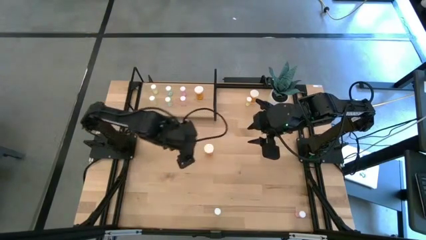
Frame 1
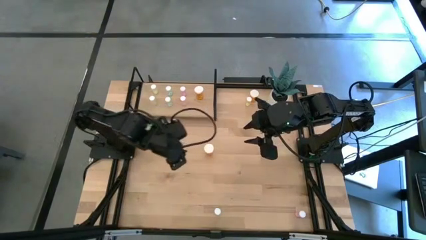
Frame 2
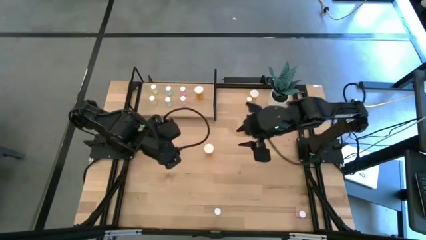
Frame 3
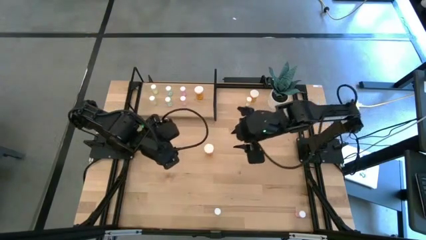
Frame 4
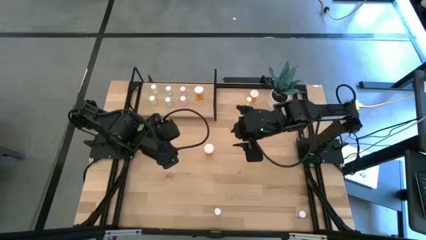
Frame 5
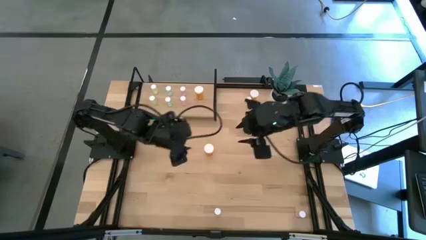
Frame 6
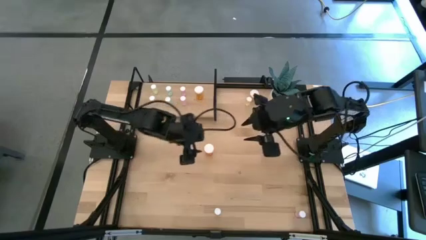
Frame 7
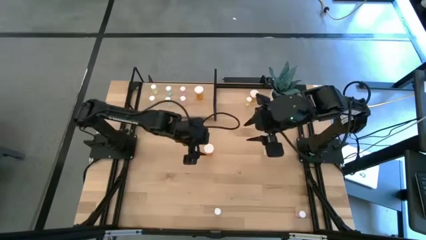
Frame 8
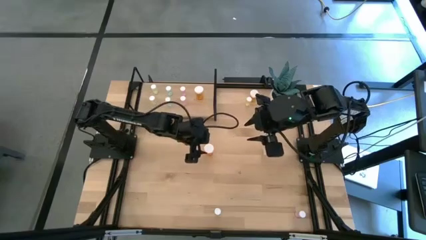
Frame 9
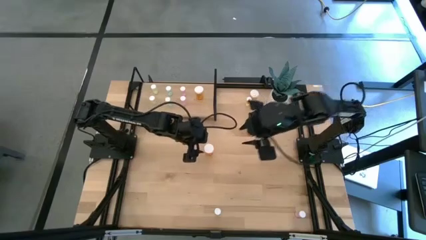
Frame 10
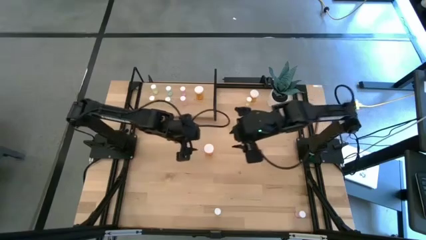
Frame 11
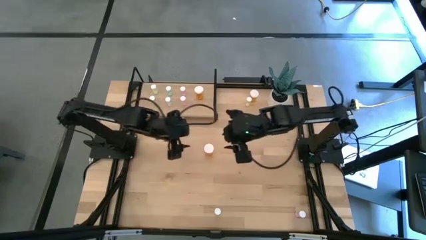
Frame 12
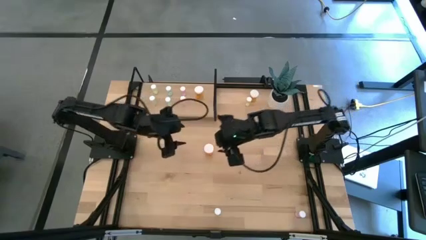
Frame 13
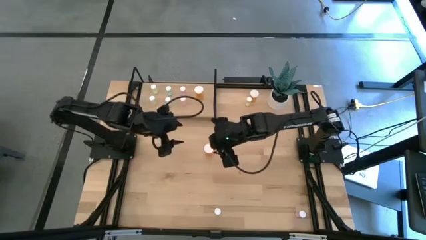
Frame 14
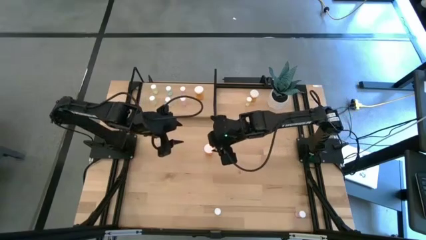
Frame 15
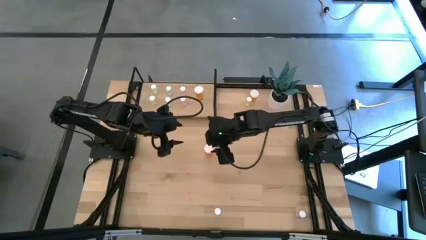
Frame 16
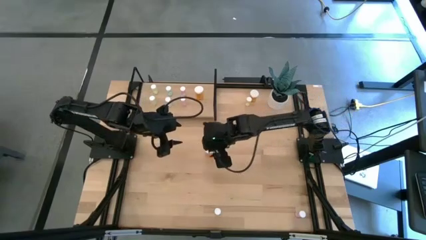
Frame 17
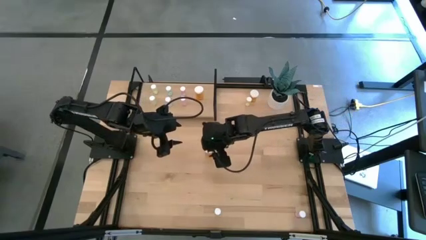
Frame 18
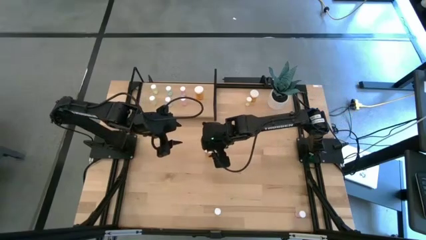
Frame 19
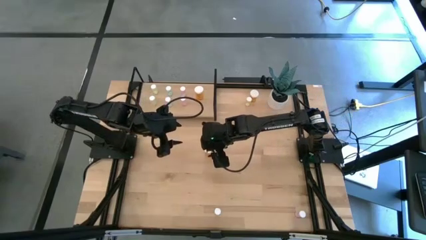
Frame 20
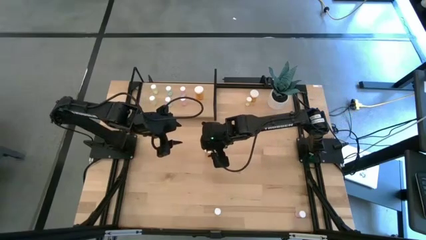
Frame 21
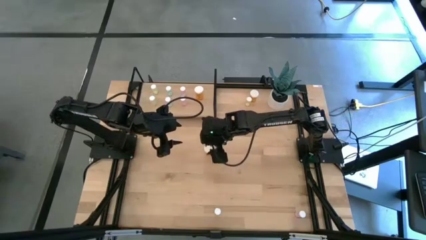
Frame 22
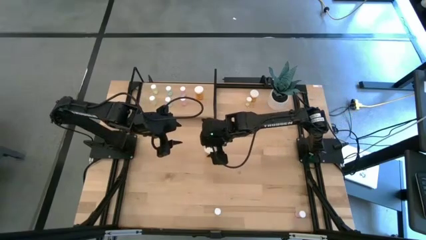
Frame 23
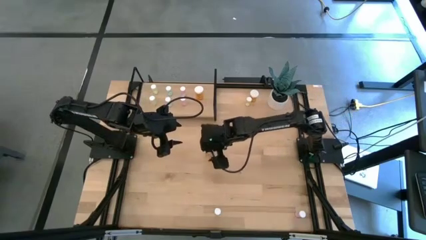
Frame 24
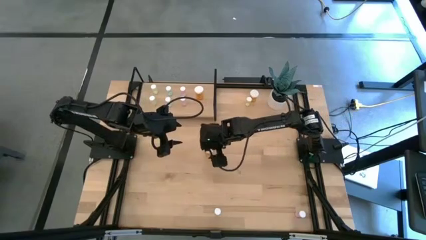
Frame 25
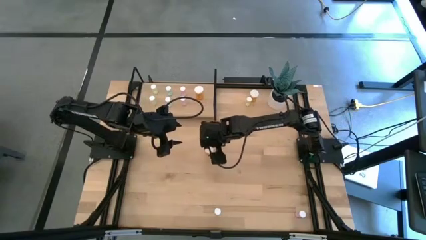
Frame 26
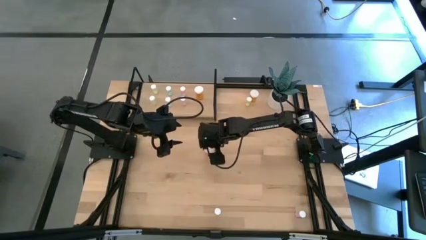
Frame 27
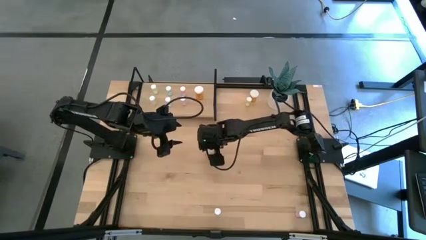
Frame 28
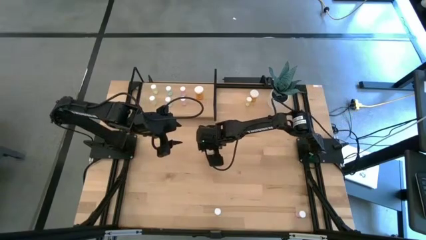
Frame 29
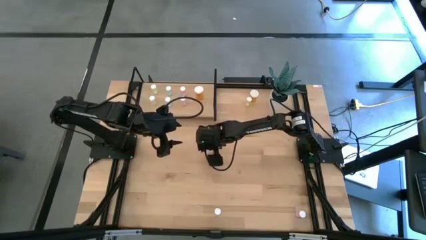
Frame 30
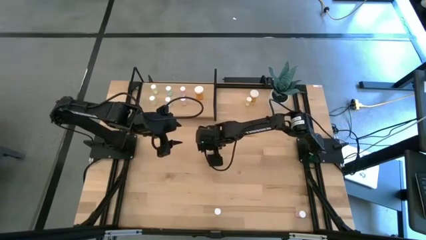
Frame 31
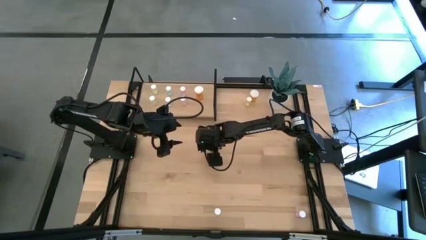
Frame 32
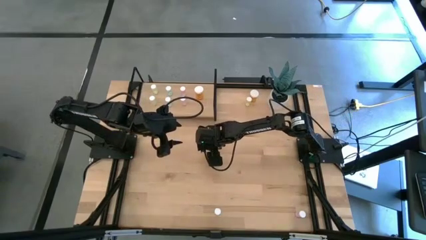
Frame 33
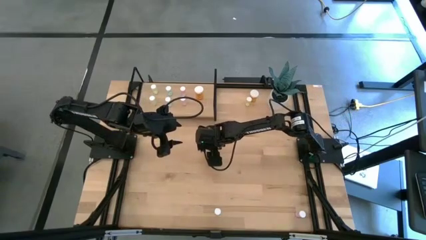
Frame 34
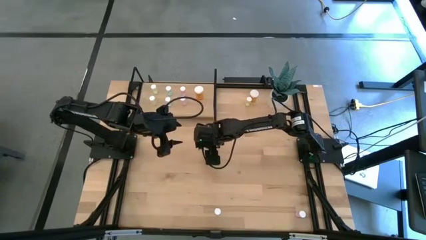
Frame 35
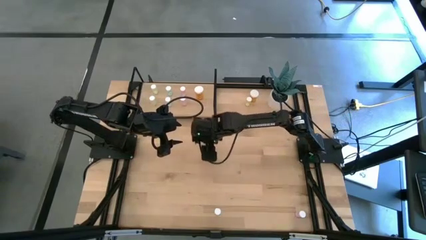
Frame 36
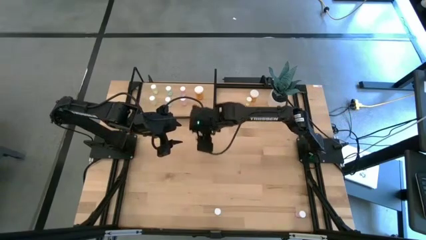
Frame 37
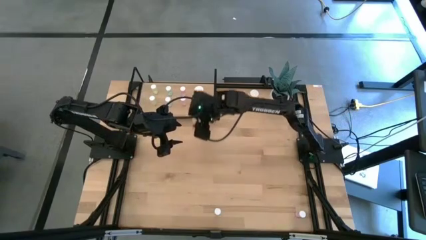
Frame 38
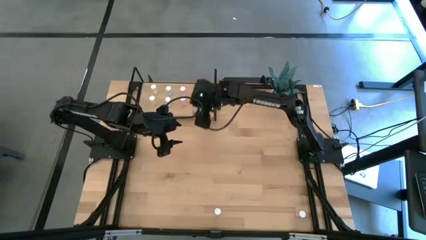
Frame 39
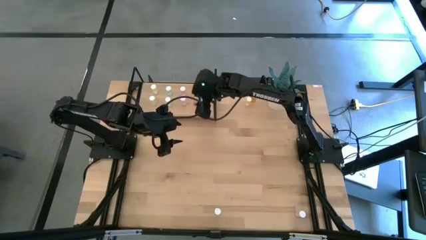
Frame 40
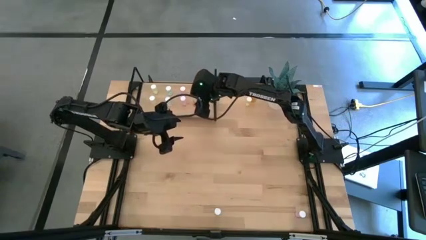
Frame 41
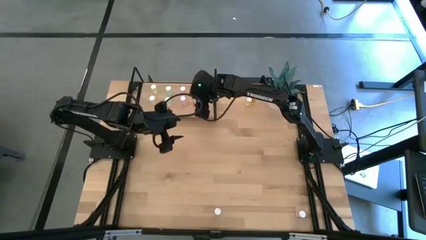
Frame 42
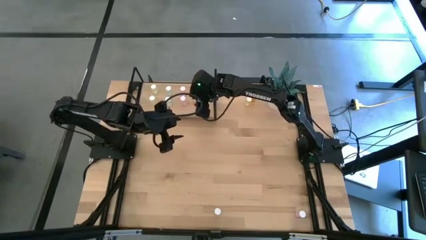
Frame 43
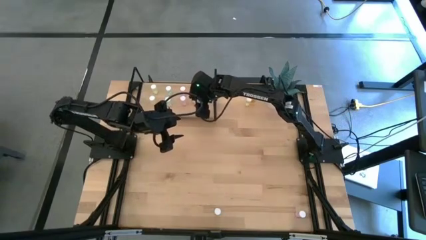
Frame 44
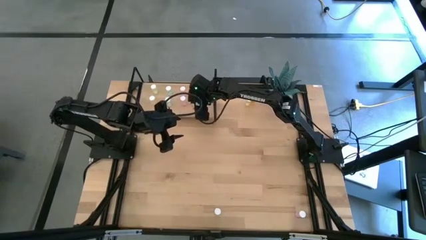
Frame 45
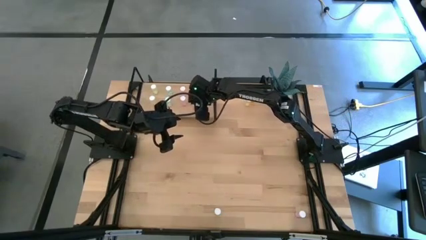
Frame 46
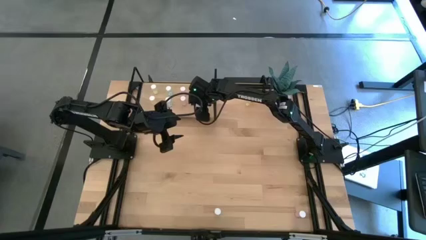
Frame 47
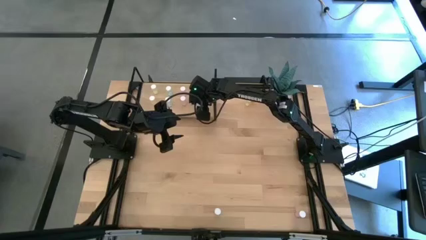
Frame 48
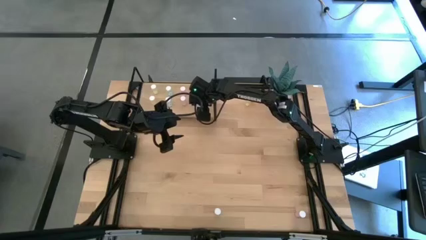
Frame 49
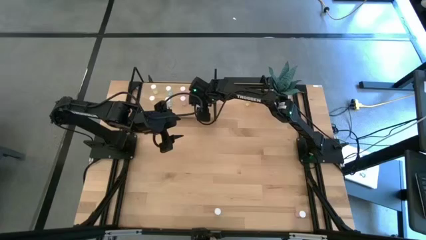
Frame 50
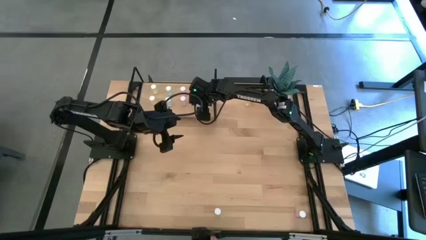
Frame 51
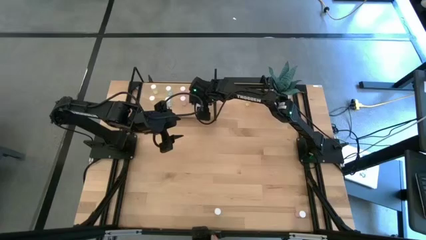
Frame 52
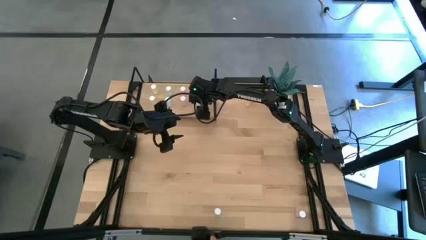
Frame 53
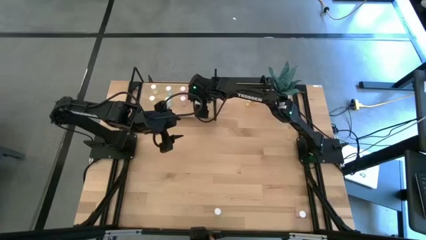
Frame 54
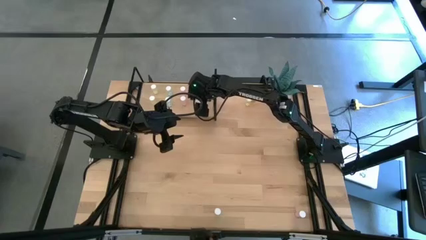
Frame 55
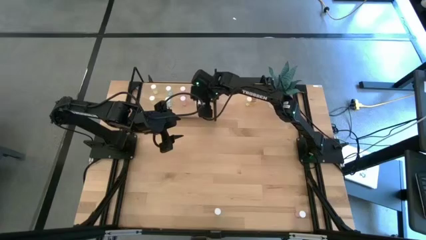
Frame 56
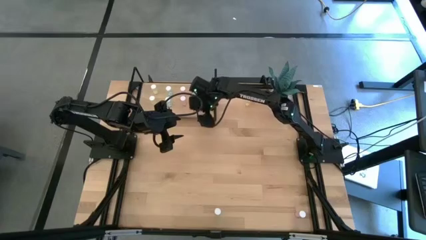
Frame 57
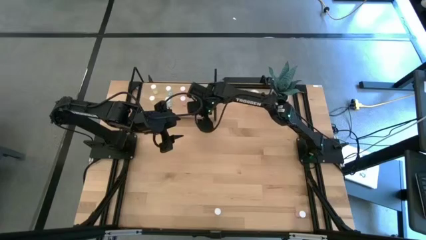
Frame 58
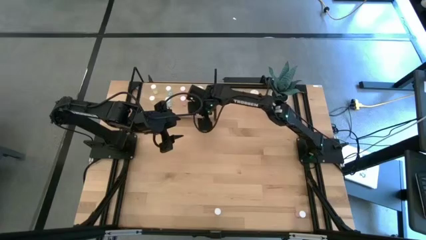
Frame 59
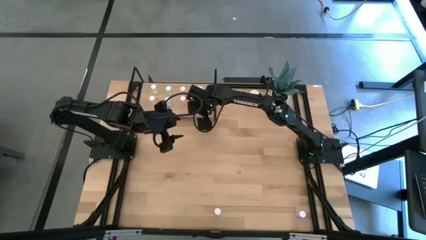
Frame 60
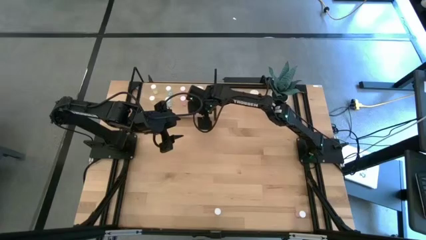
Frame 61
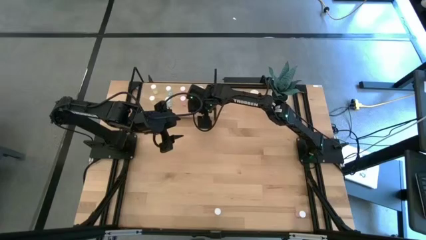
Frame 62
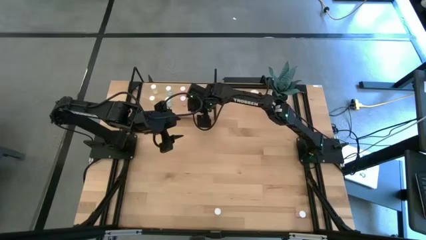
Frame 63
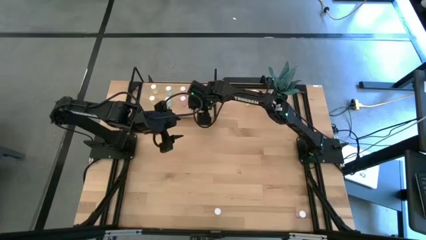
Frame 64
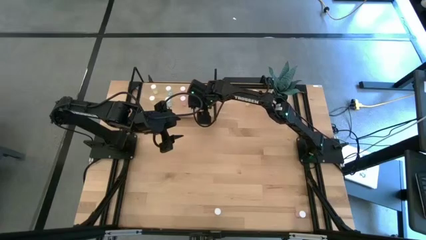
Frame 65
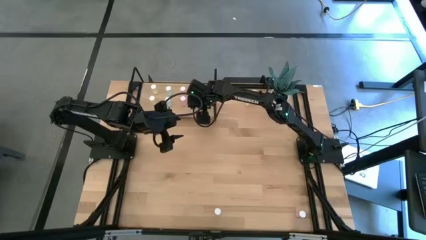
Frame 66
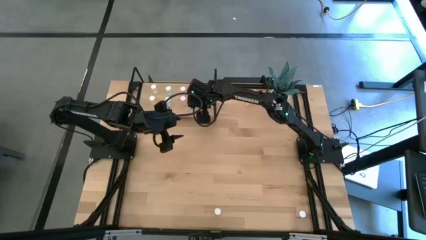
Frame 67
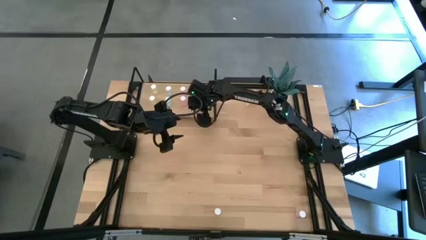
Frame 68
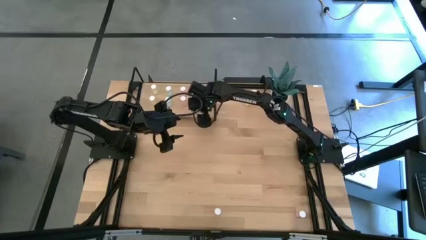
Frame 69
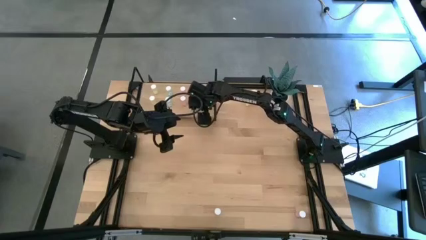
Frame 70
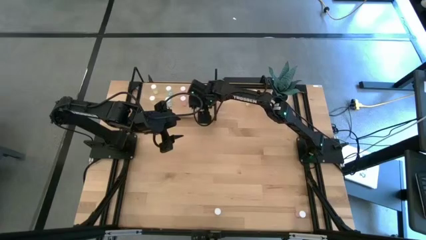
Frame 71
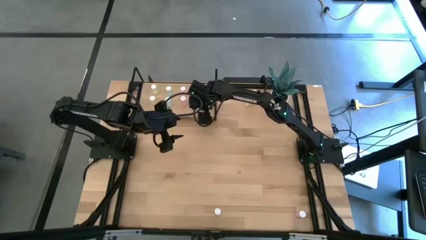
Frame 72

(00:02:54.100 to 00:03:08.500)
Task: Pick and place medicine bottles onto shelf by color
Put the bottom orange pill bottle on the shelf and align it with the other orange pill bottle

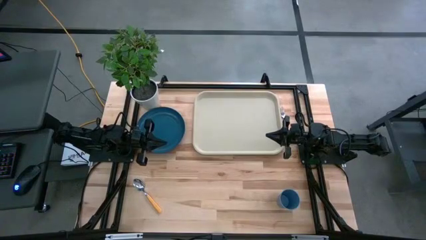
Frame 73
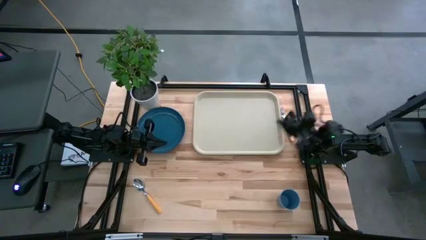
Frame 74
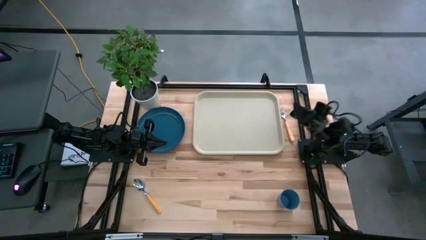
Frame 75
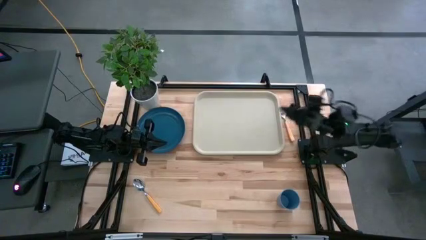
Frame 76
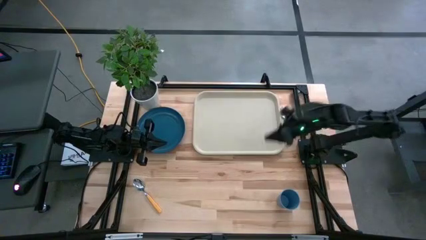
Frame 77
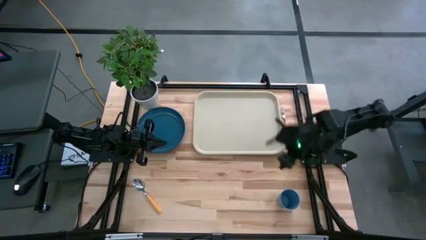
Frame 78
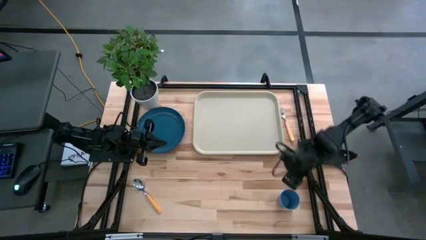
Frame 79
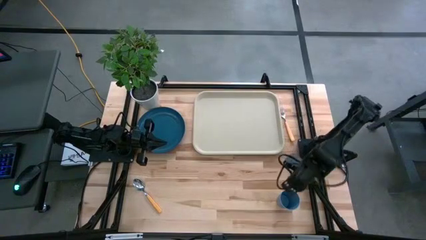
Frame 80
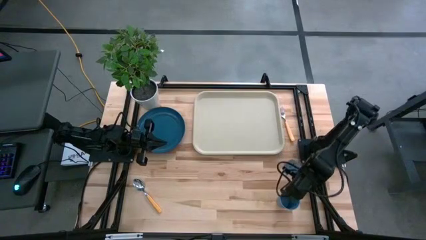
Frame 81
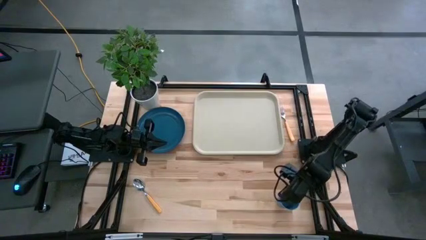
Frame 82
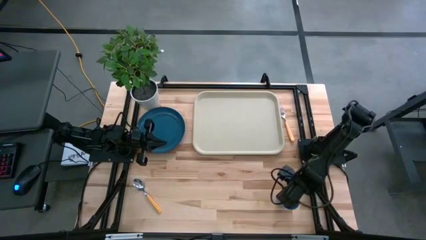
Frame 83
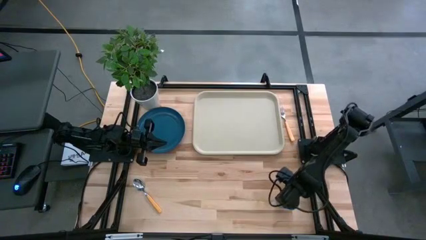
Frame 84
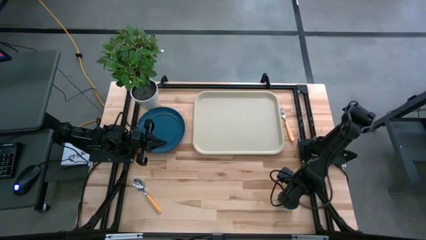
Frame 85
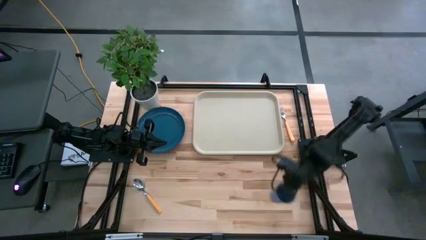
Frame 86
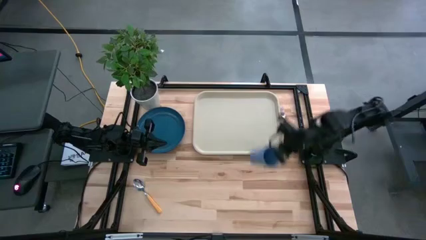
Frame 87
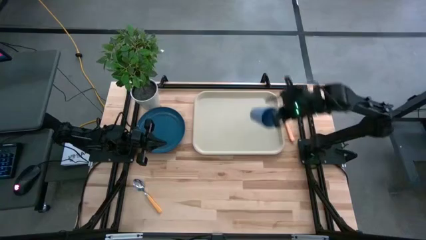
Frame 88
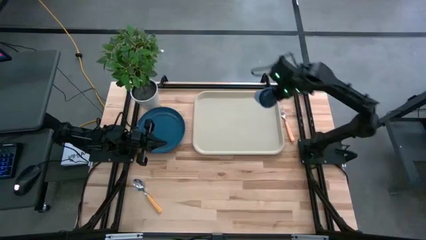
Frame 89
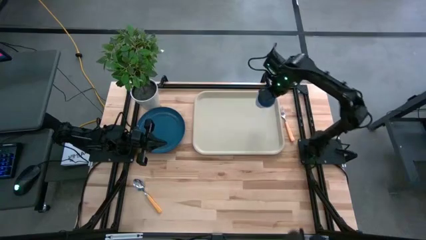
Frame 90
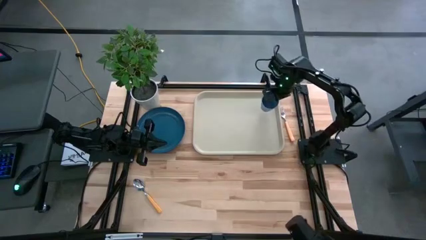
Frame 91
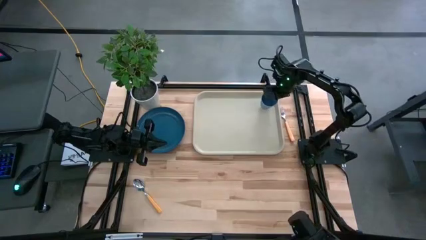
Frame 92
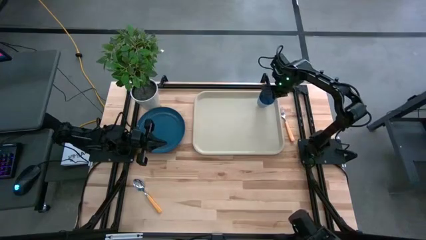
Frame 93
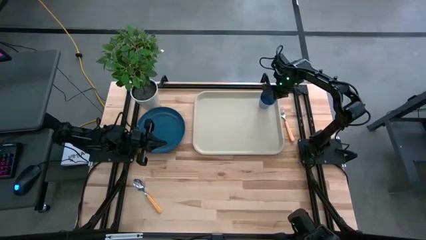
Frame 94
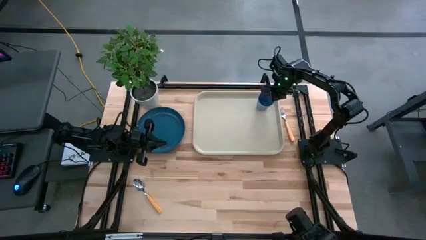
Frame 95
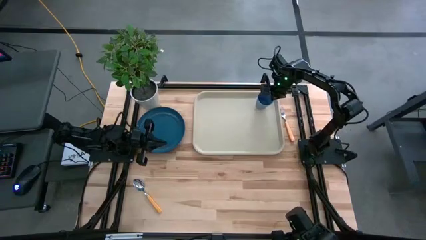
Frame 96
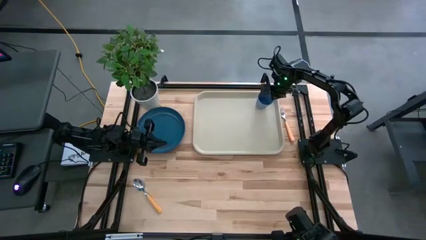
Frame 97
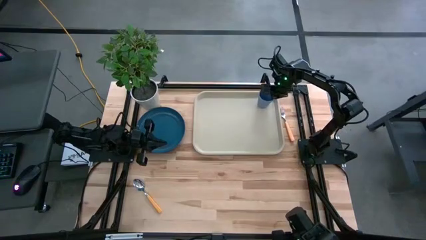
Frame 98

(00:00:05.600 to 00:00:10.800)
Task: Pick and place plate/cup/fork/spoon on tray
Put the blue cup on the gray serving tray
